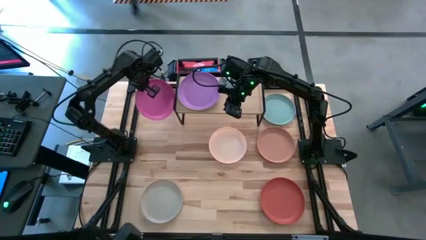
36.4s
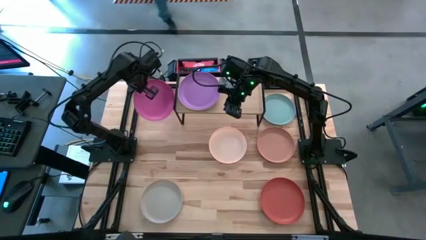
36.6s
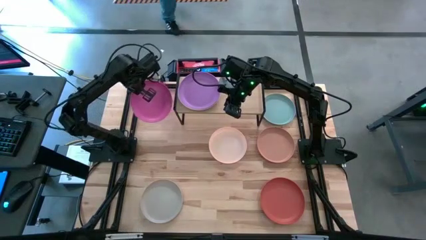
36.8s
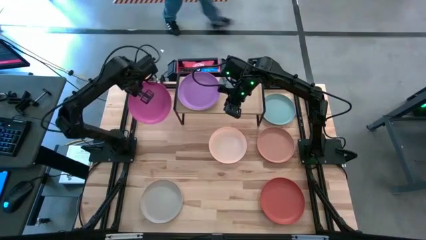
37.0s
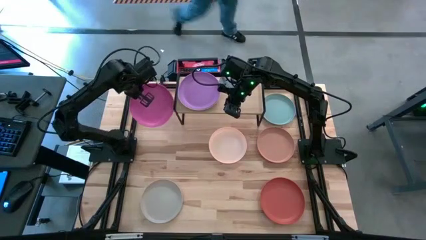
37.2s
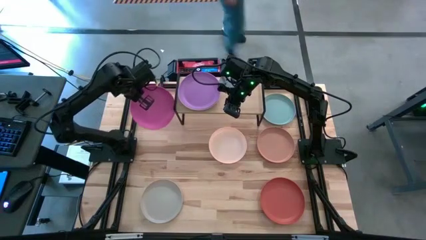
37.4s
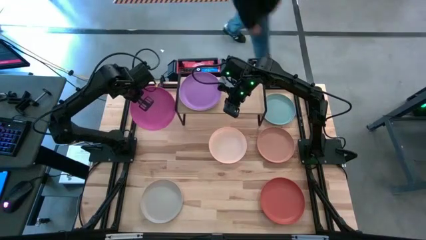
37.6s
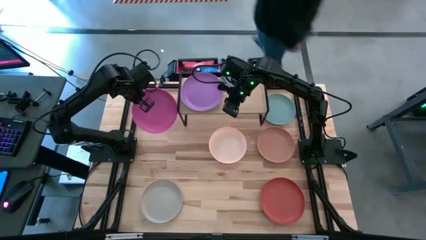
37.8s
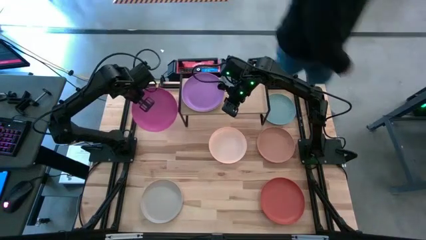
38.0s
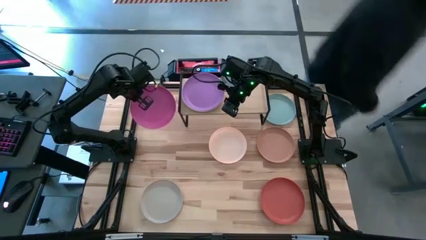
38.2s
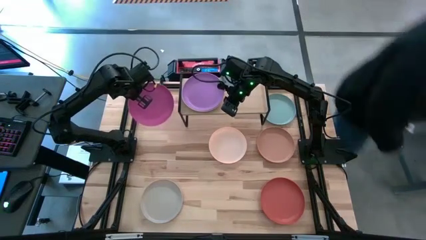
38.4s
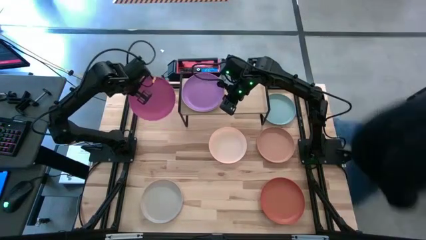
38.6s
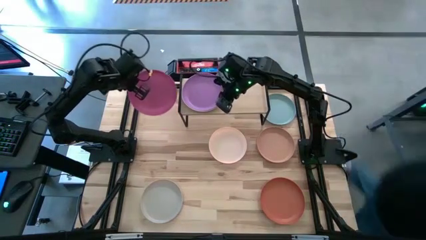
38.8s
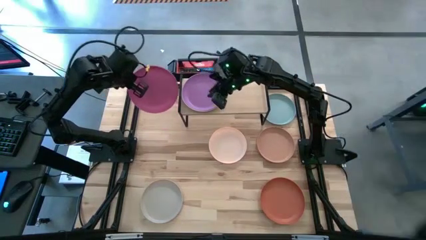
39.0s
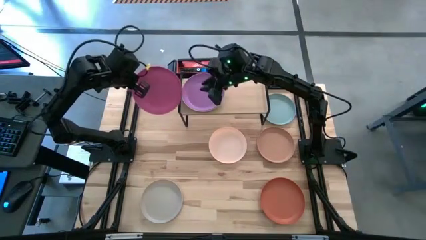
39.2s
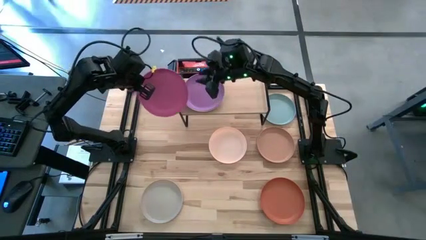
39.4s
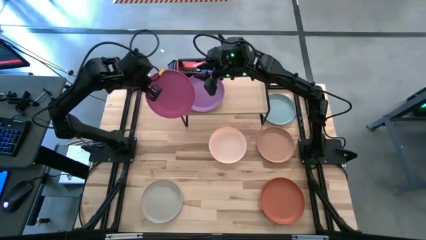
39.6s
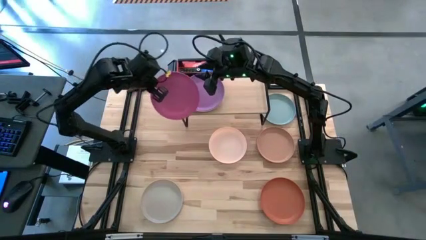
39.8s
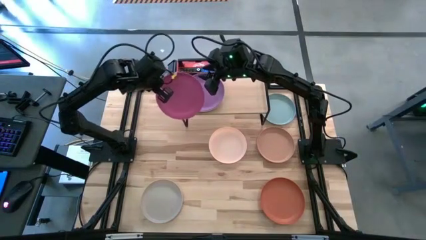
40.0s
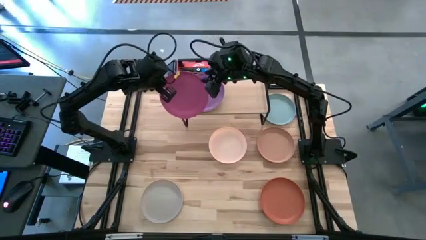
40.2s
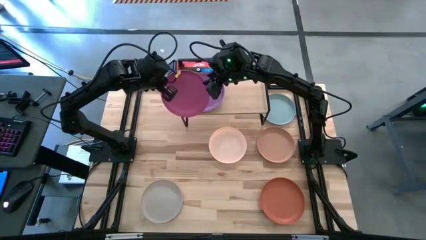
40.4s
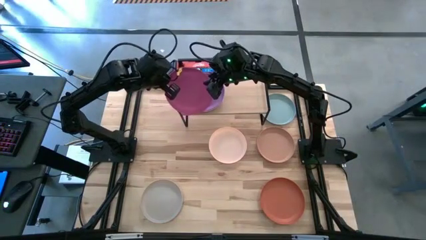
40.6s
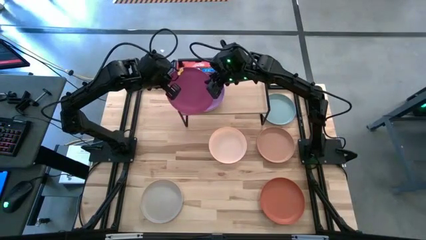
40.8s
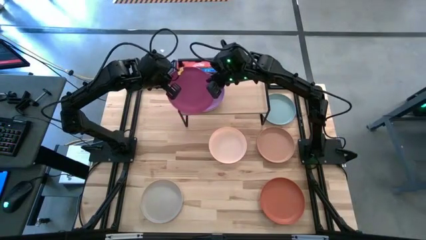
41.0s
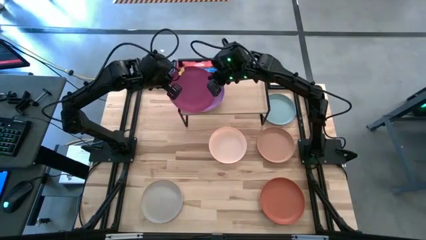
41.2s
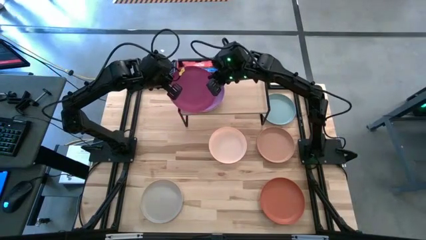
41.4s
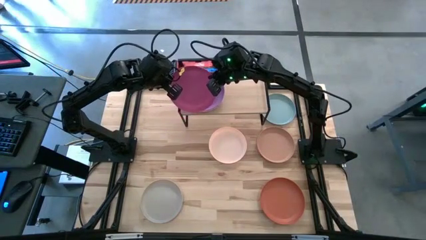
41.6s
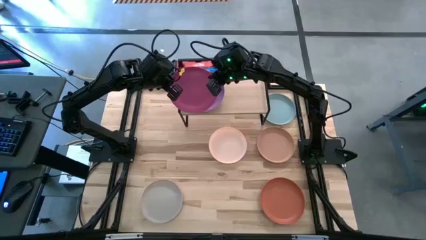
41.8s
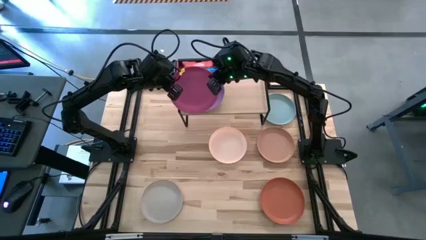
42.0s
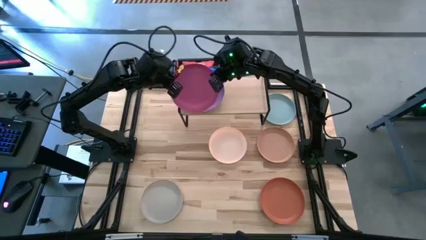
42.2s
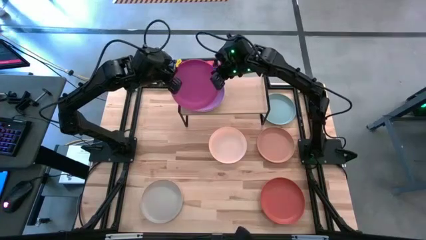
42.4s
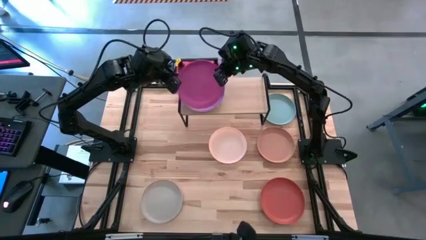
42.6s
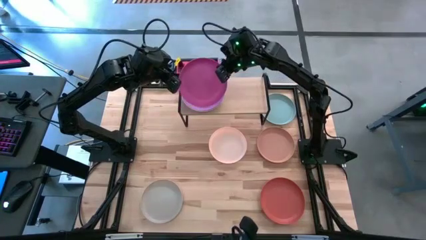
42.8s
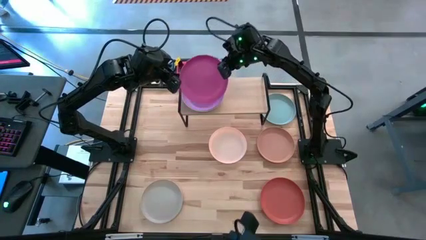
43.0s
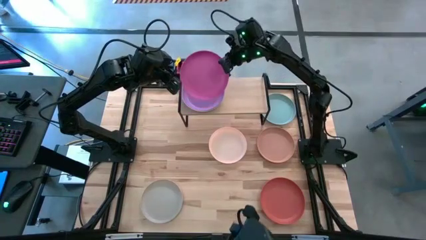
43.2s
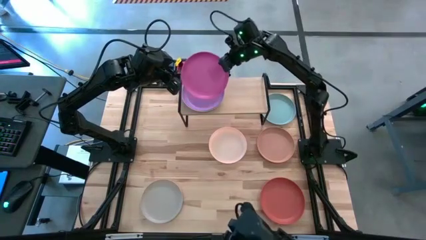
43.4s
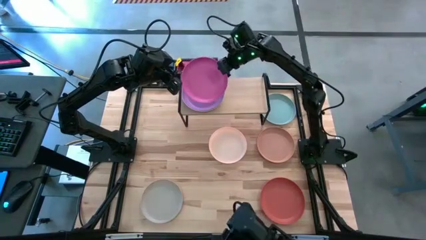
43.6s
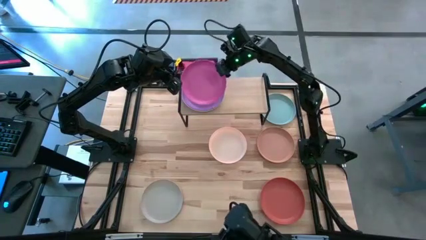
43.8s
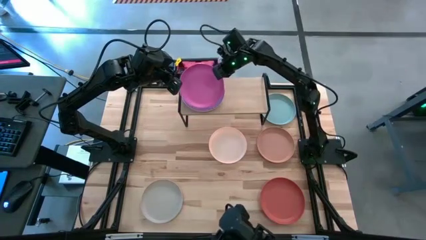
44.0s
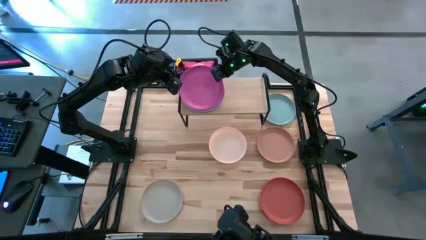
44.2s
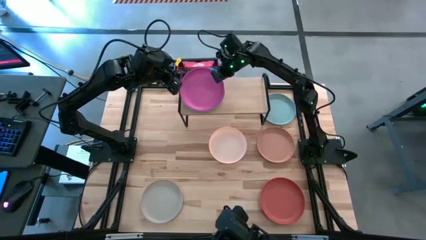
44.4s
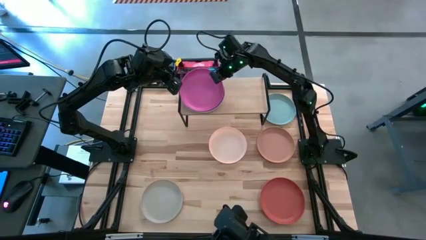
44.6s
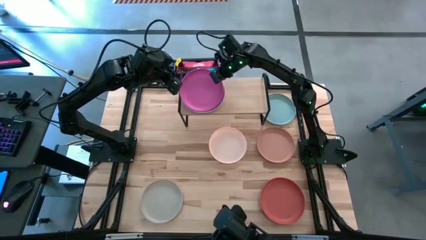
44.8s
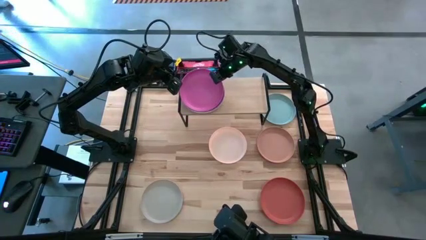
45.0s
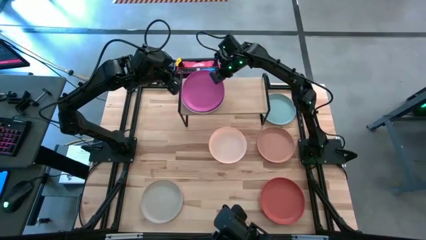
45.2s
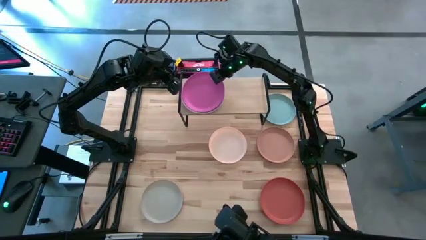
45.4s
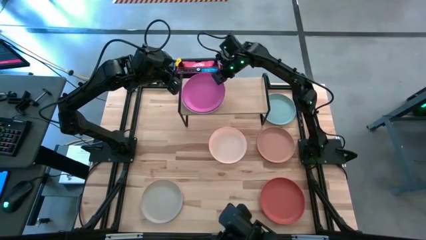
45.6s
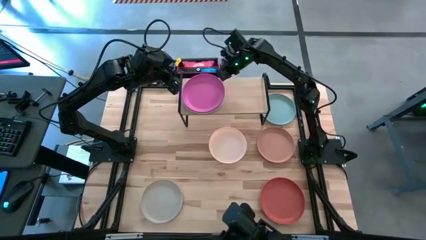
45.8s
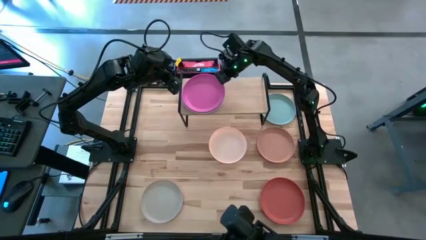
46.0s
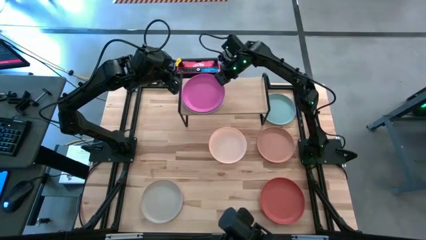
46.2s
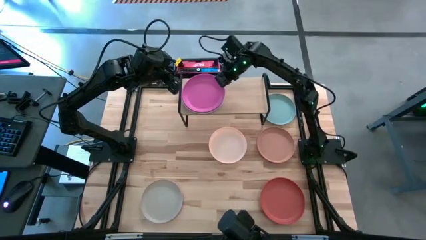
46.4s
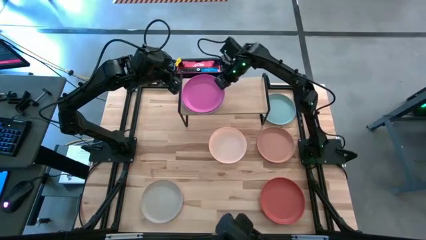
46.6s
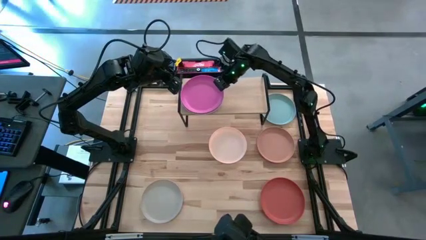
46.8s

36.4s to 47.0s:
Task: Place and stack plates onto a shelf
Stack the pink plate on top of the purple plate on the shelf
